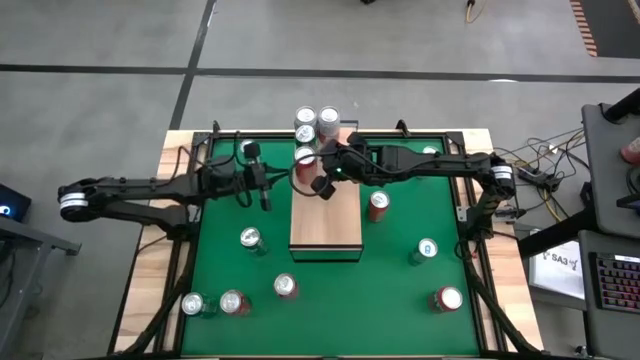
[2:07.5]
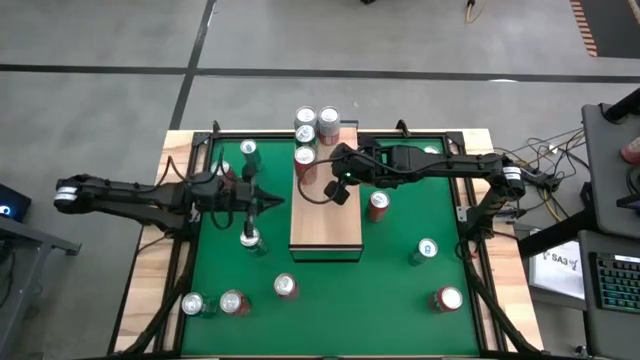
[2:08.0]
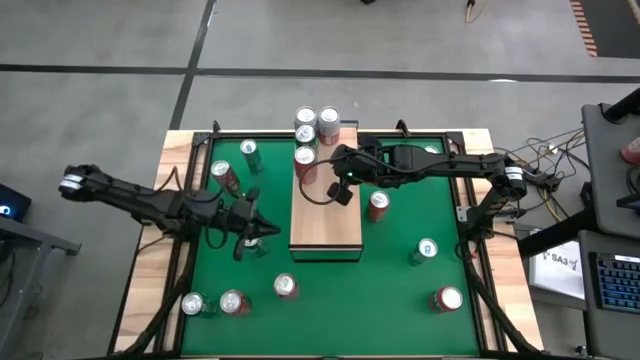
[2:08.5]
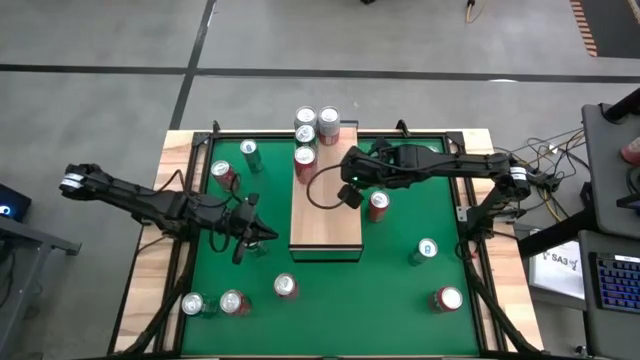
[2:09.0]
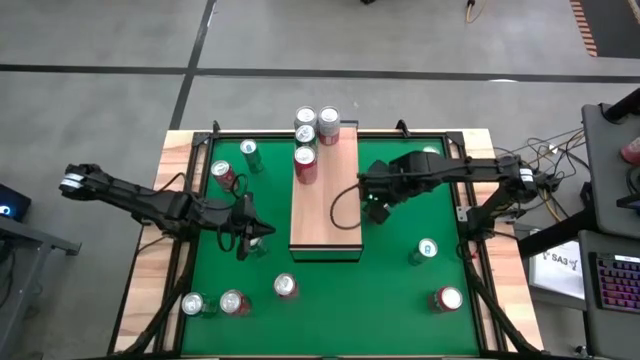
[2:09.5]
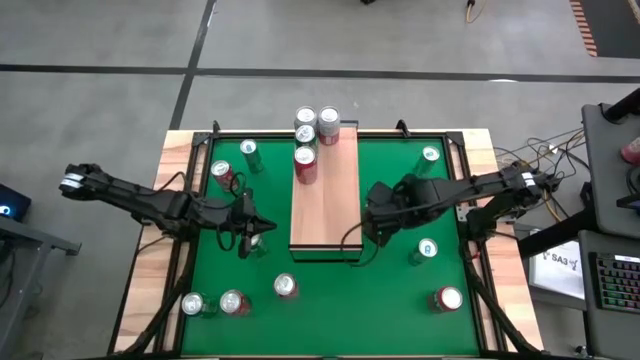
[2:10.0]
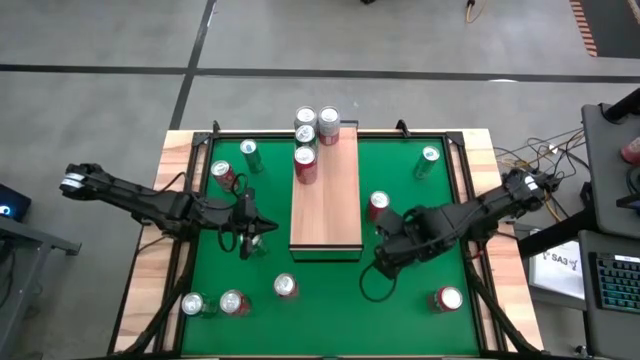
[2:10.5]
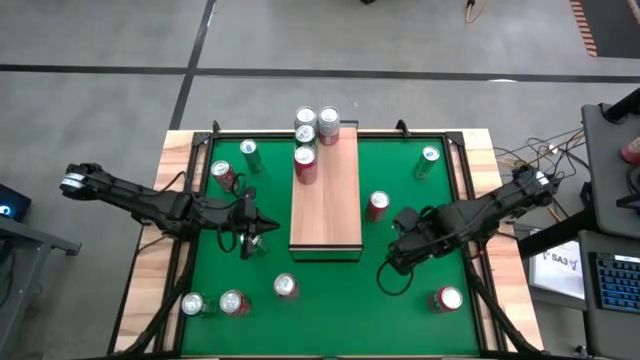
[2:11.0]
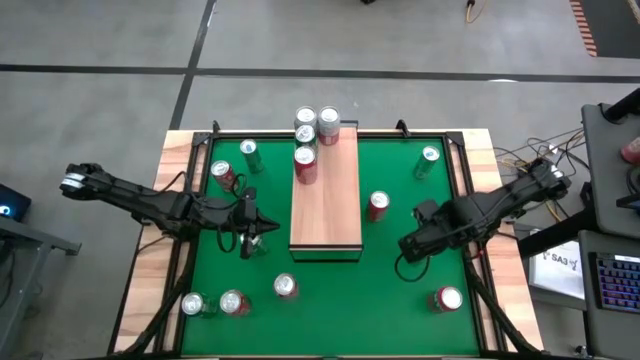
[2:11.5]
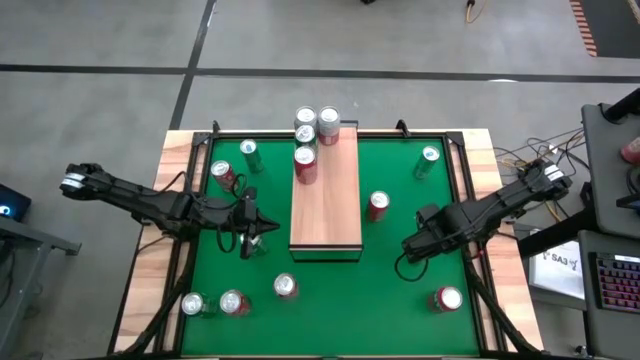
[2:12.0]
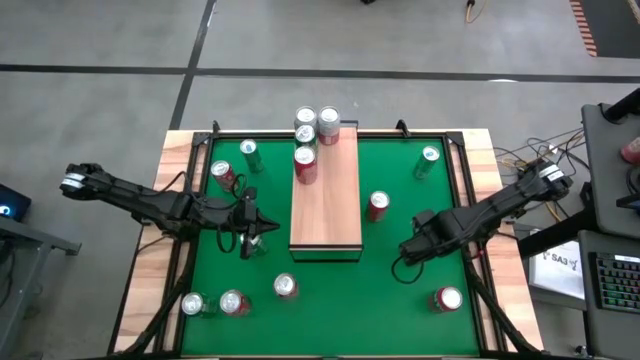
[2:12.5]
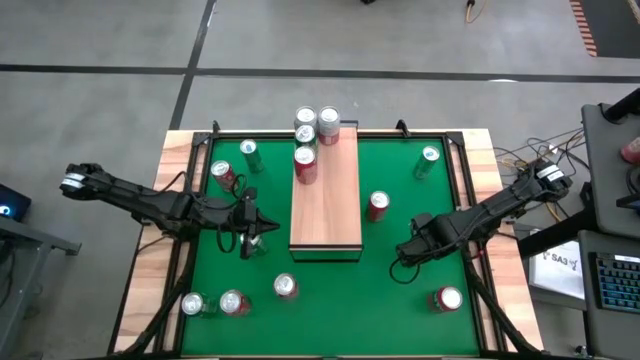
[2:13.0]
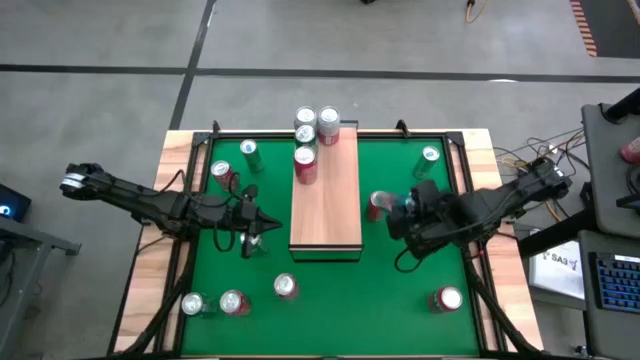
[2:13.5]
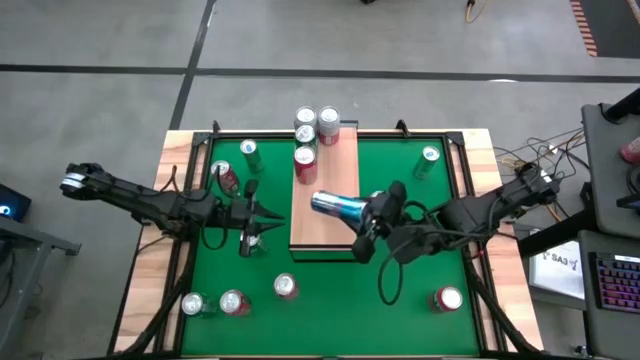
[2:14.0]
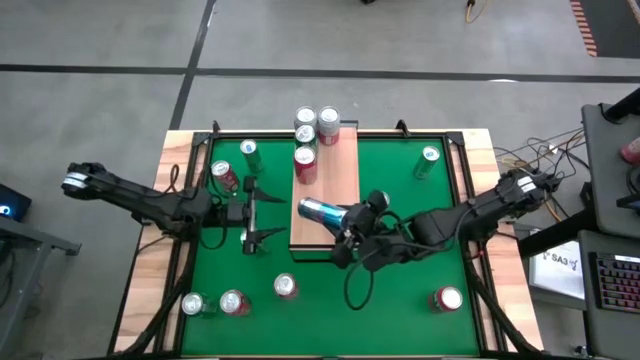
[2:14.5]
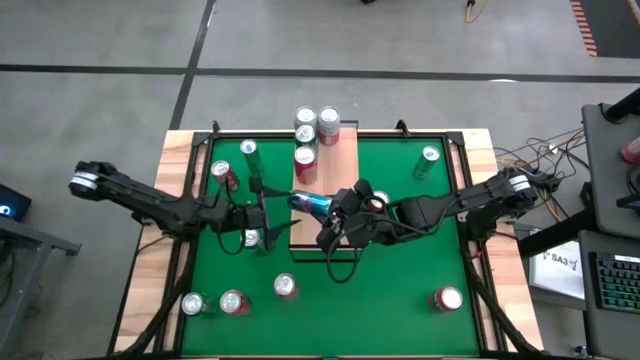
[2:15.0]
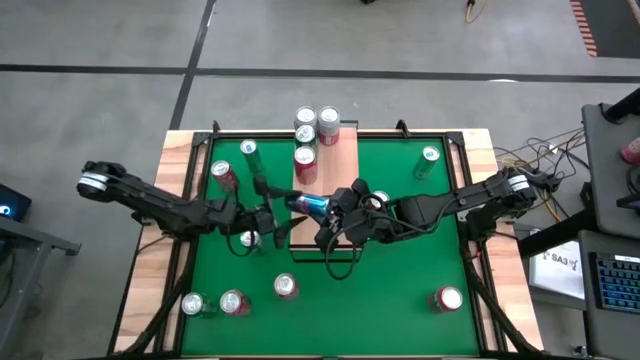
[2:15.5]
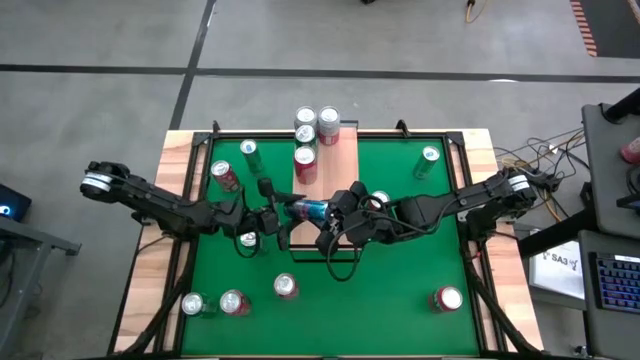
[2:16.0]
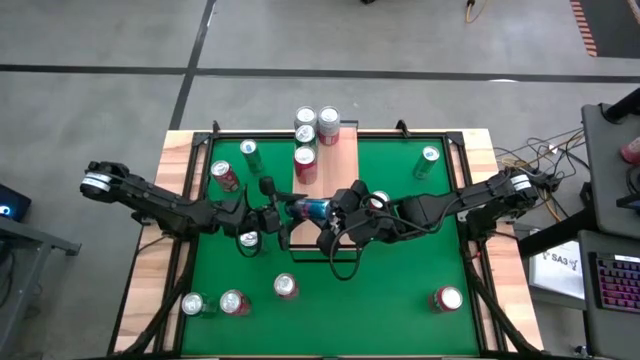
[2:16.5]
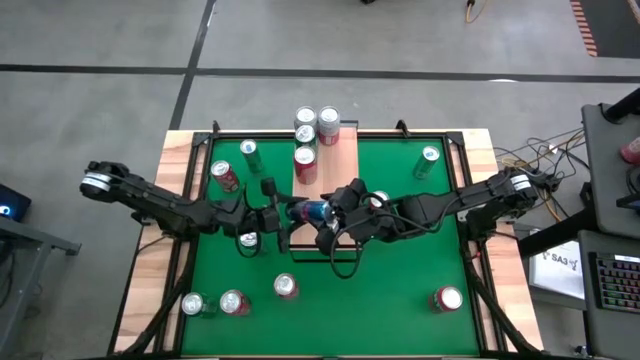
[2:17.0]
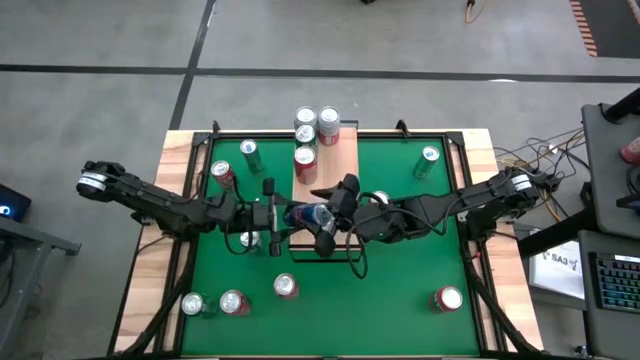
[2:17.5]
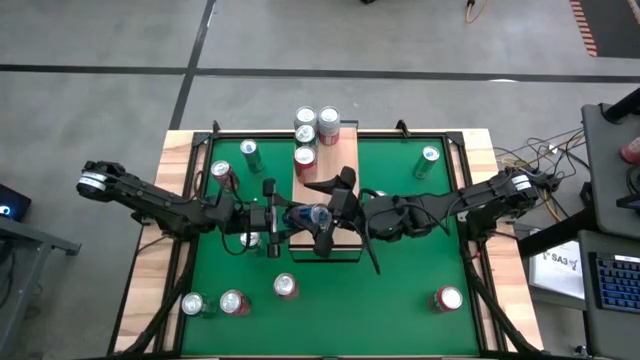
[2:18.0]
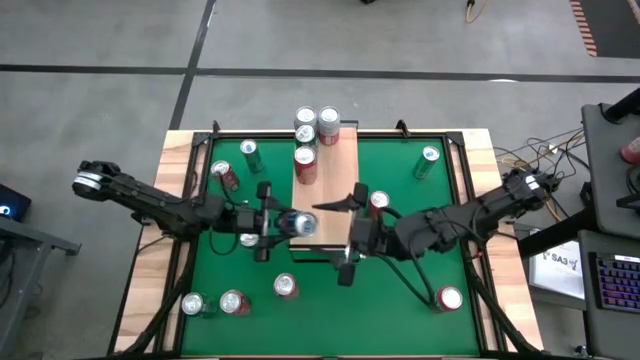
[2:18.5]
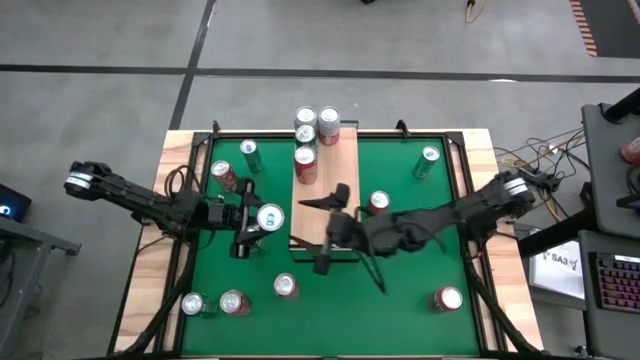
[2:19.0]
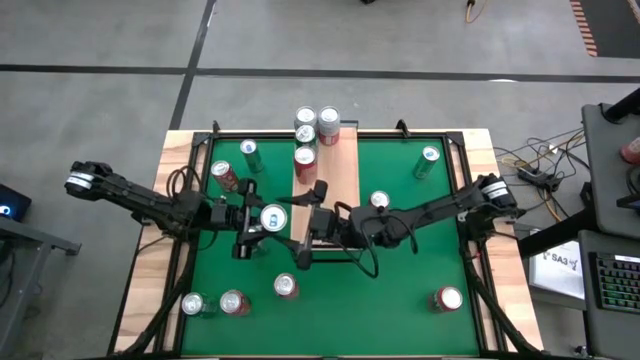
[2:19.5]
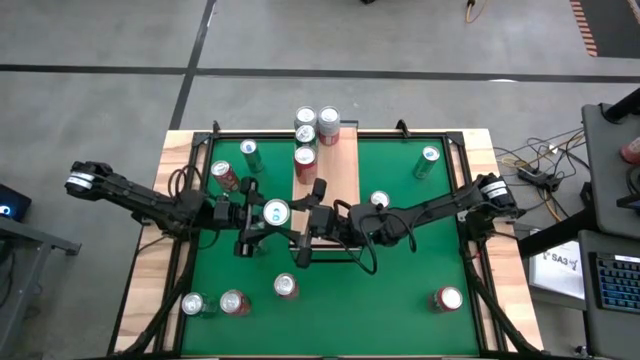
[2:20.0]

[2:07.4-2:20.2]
Task: Place canned beverage on shelf
Put the blue can on the shelf

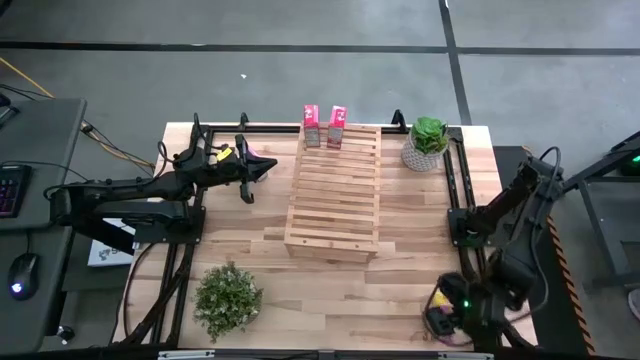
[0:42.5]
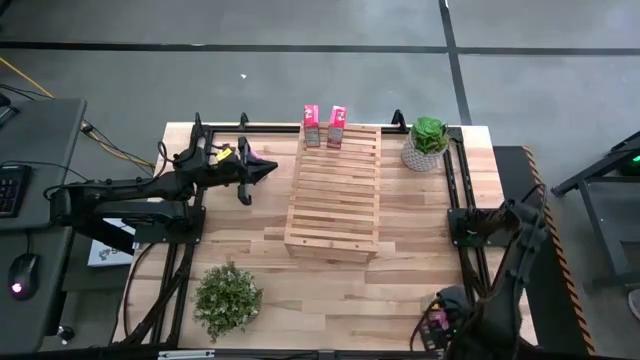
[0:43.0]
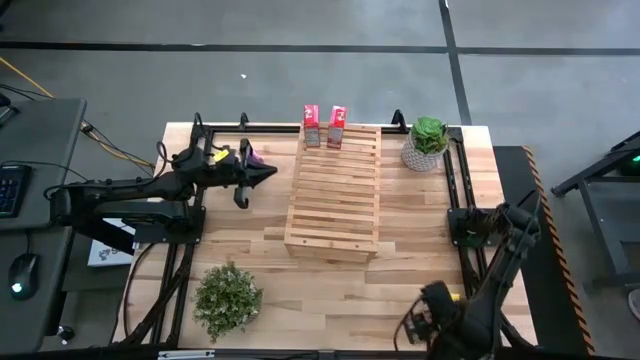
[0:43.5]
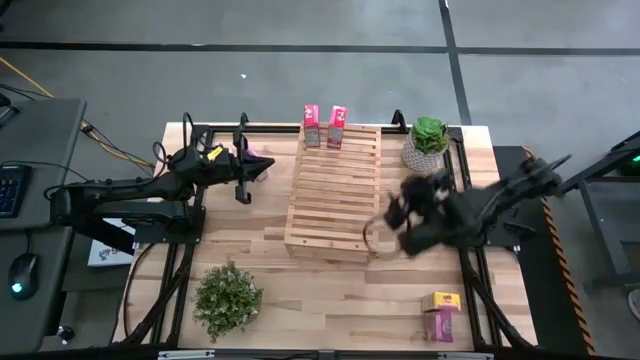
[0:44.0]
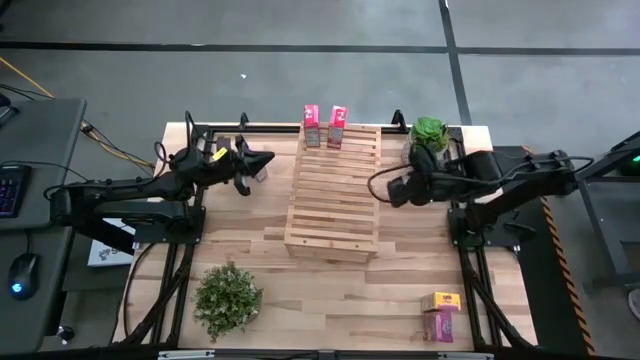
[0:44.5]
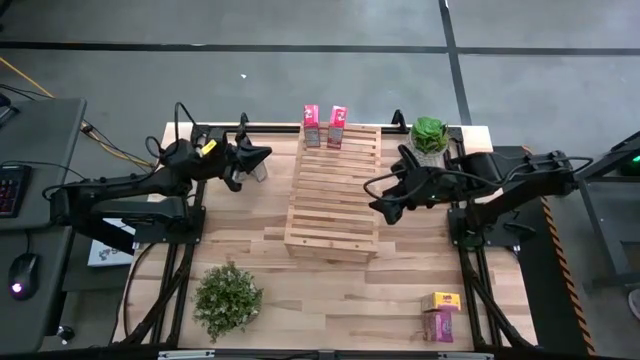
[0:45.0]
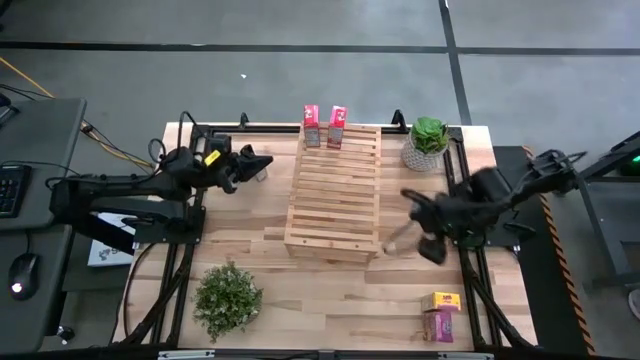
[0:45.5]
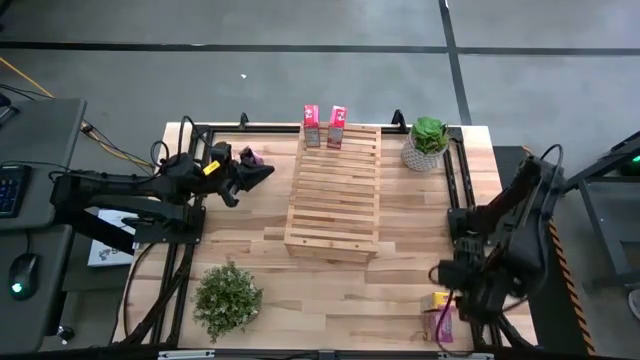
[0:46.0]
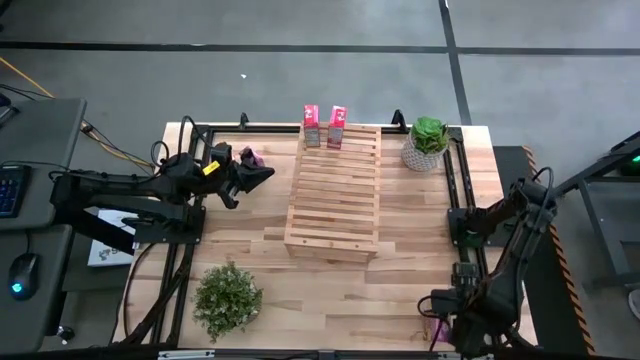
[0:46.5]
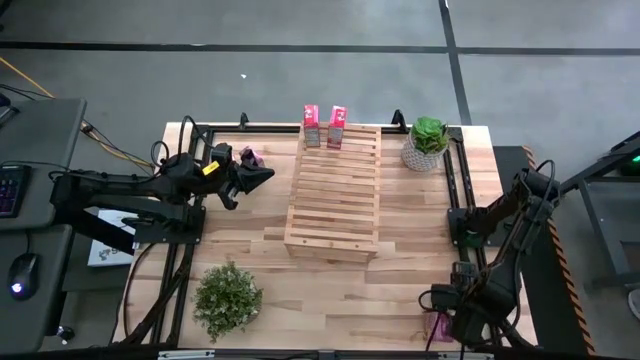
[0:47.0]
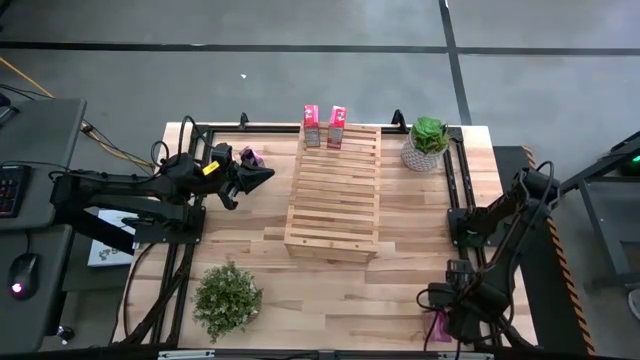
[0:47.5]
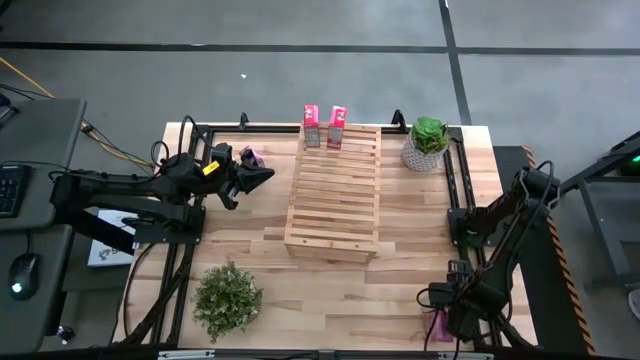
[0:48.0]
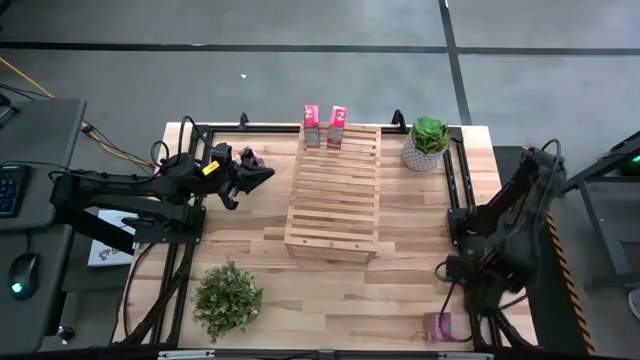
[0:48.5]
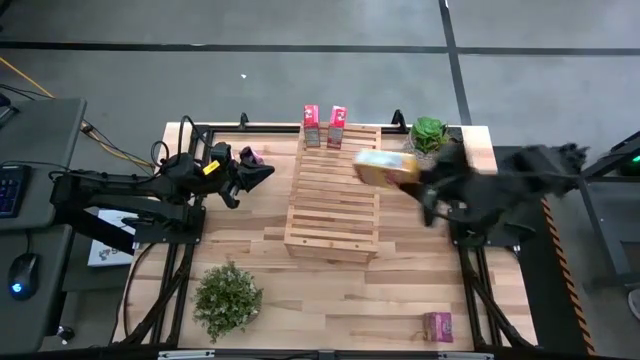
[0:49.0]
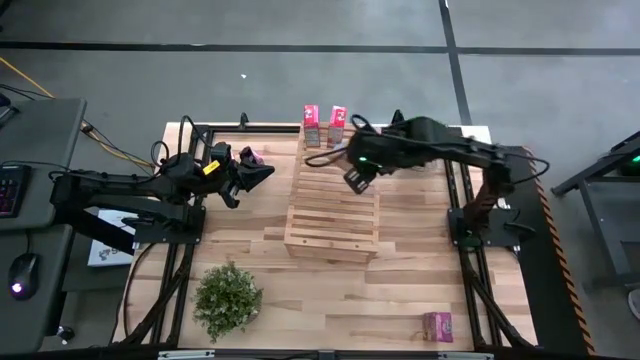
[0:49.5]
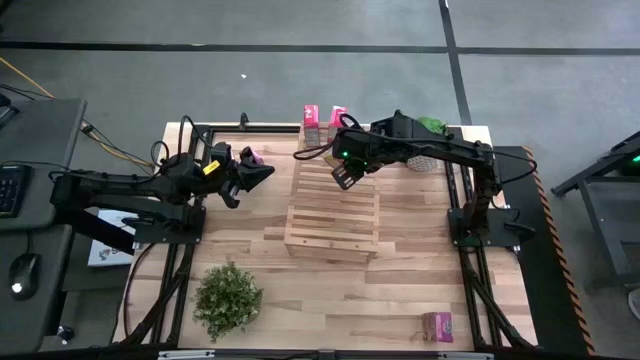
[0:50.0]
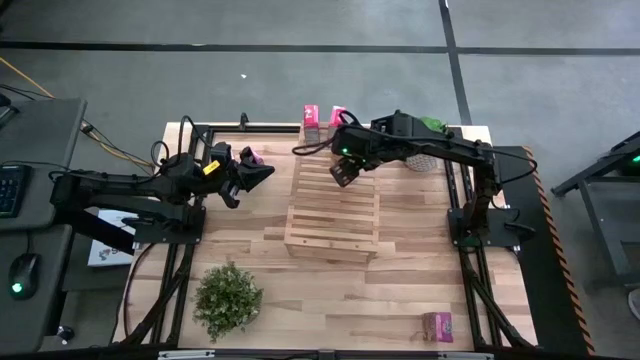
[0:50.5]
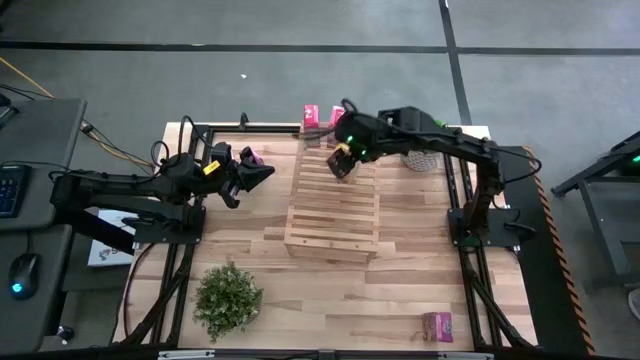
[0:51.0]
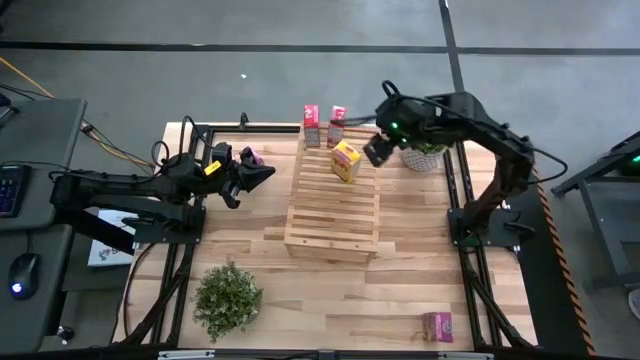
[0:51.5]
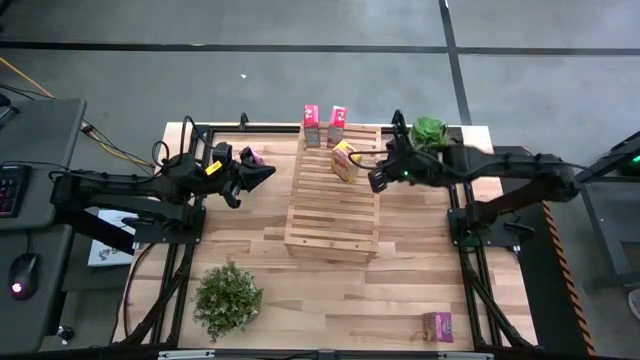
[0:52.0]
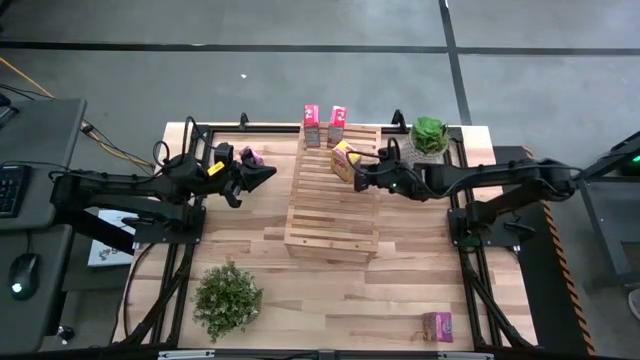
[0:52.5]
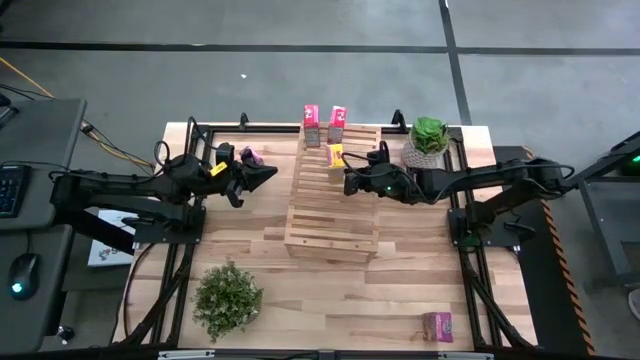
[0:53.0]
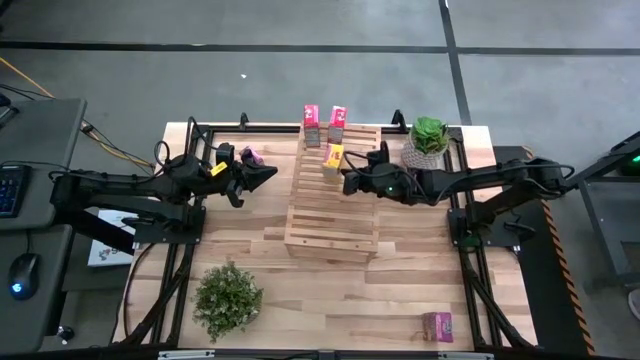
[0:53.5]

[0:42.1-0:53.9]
Task: Stack cereal on shelf
Put the bottom yellow cereal box on the shelf
